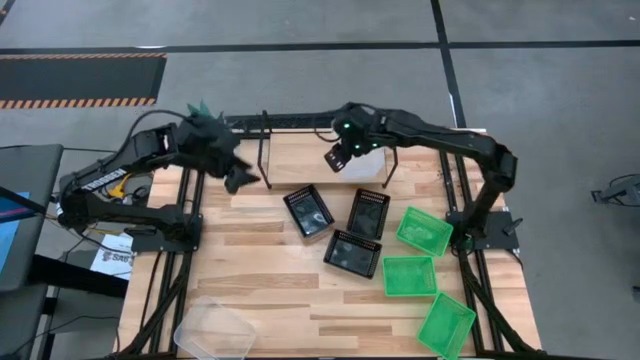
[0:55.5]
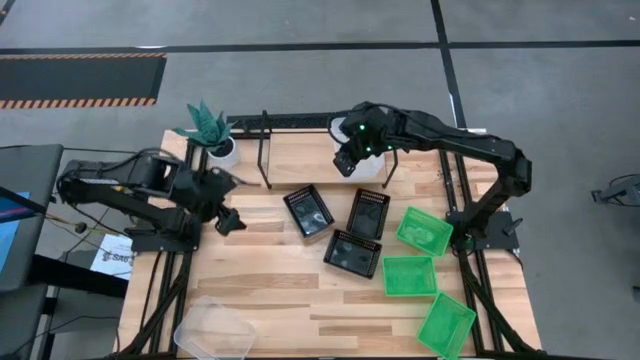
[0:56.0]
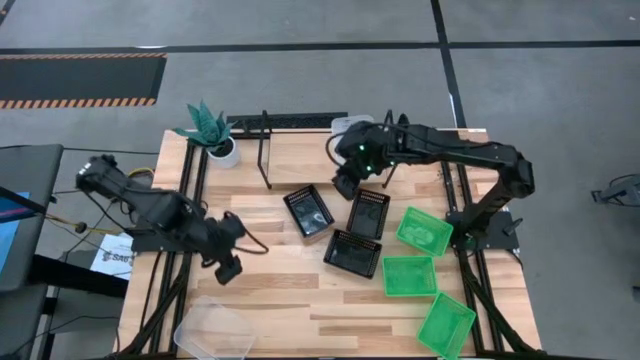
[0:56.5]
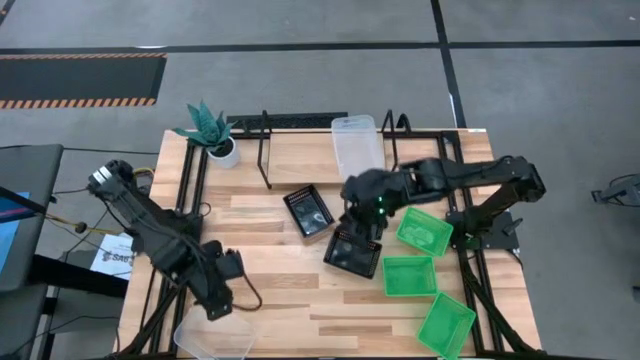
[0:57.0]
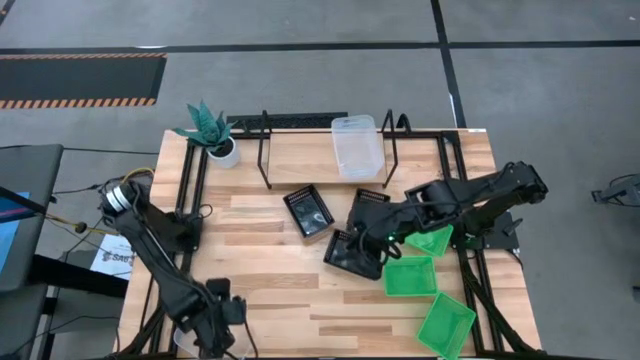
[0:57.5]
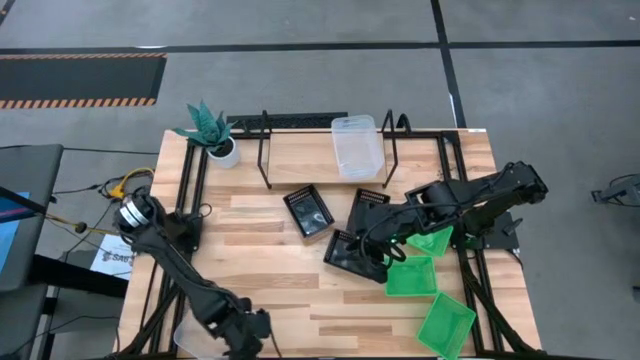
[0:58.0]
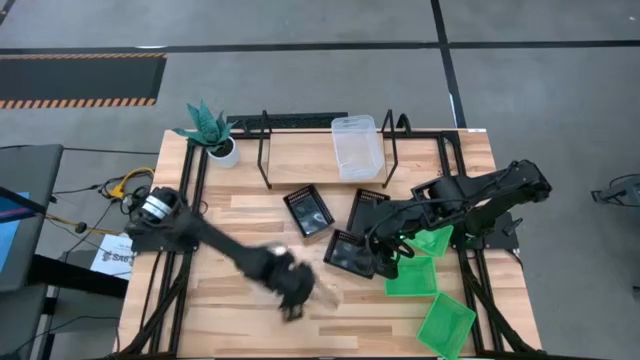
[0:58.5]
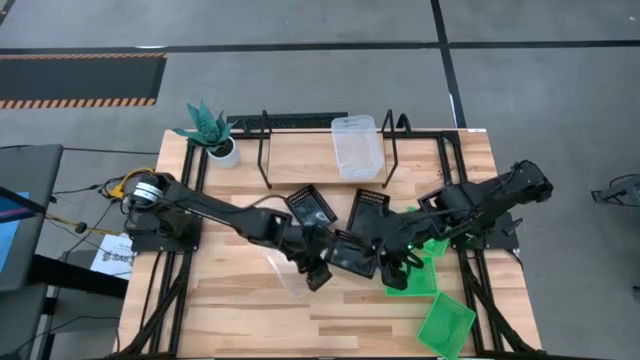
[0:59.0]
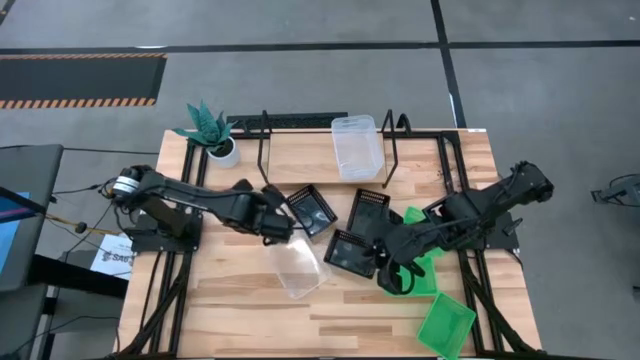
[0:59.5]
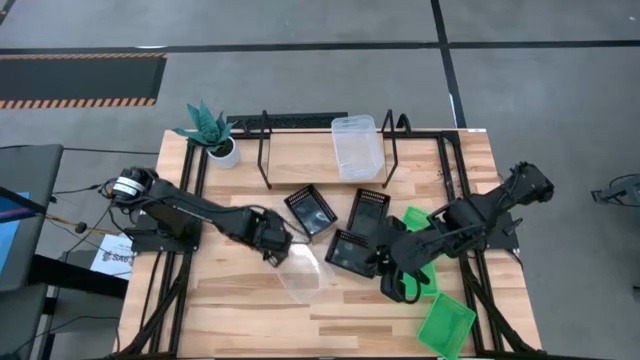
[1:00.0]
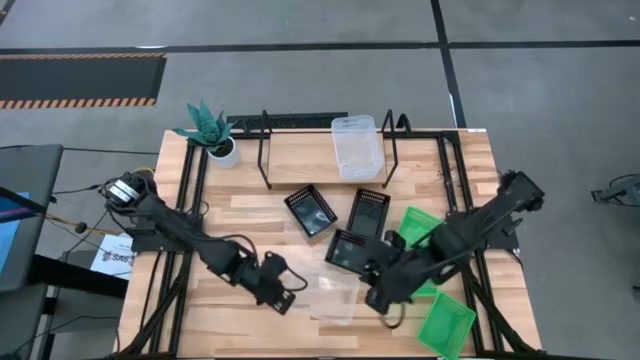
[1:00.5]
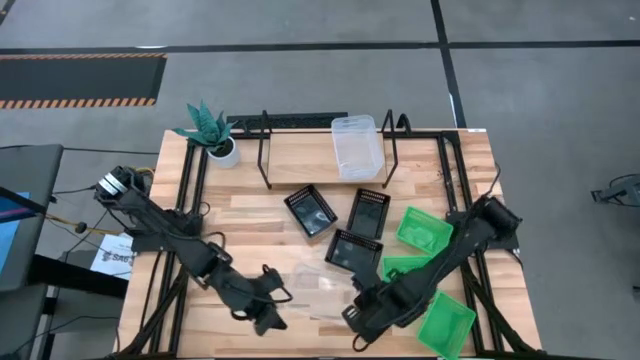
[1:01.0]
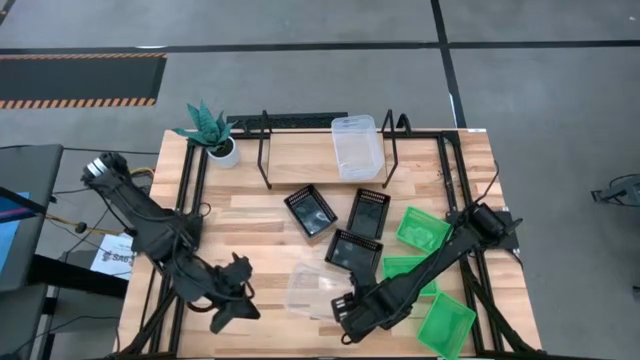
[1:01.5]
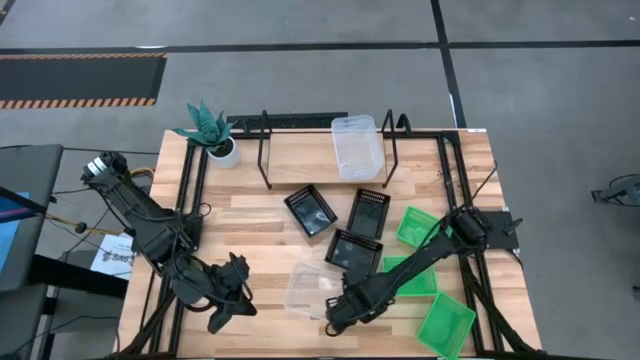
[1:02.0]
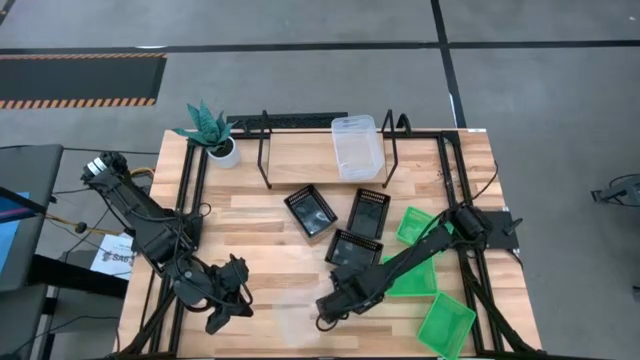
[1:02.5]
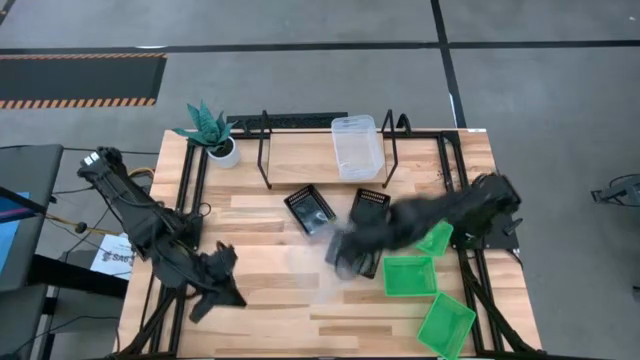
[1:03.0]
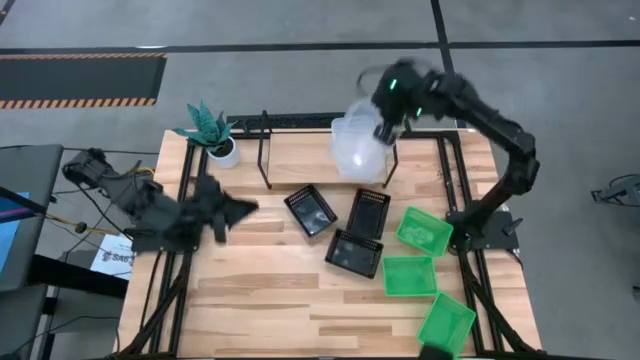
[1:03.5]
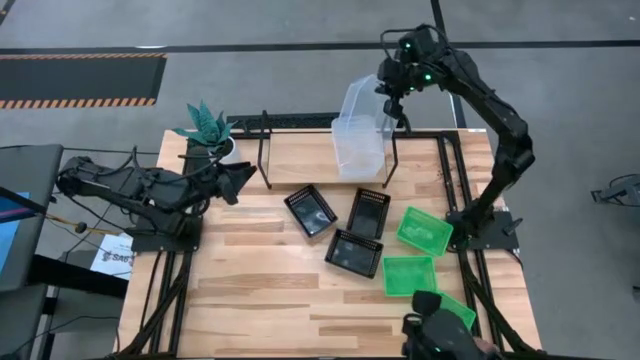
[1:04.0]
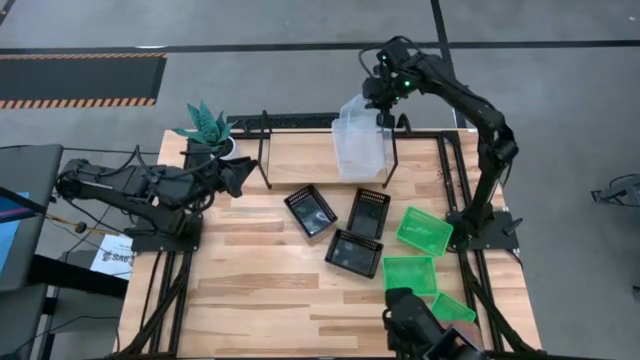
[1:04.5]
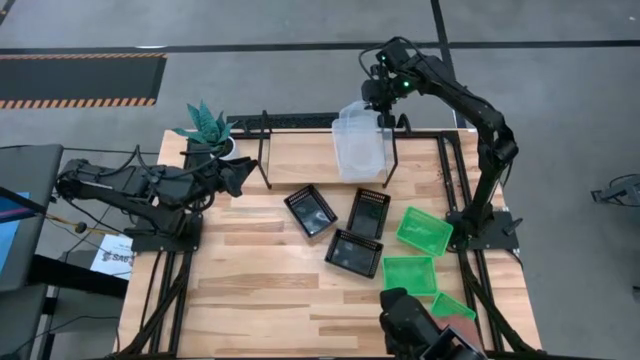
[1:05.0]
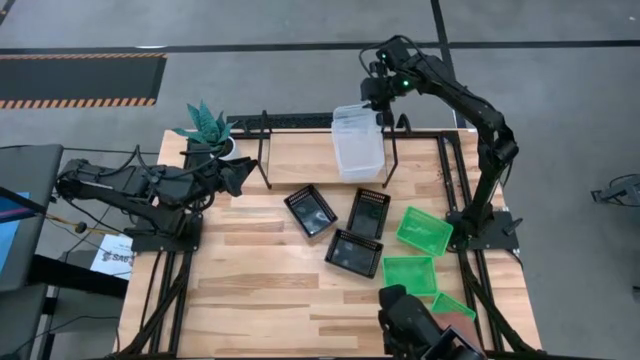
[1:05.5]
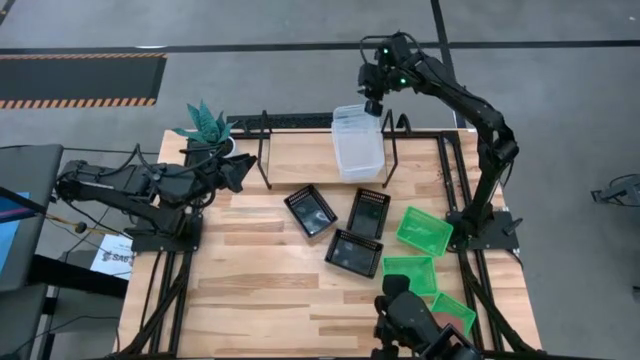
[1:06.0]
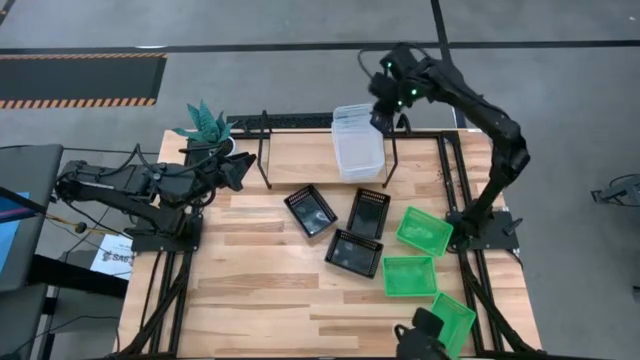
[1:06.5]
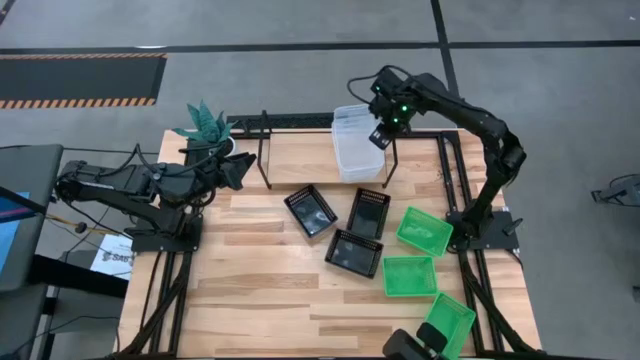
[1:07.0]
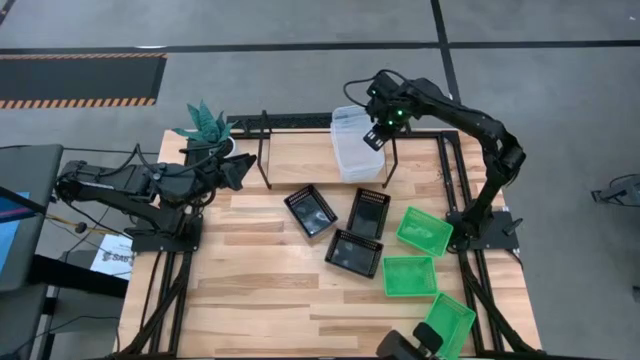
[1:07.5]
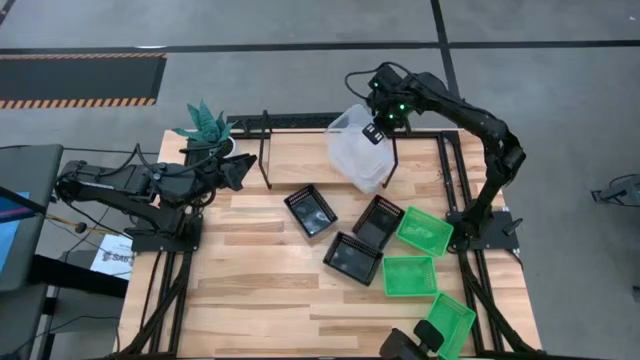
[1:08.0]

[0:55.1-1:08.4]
Task: Stack baskets on shelf by color
Stack the transparent bin on top of the stacked transparent bins on the shelf

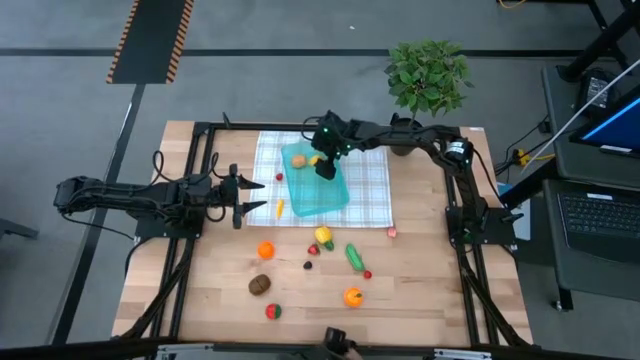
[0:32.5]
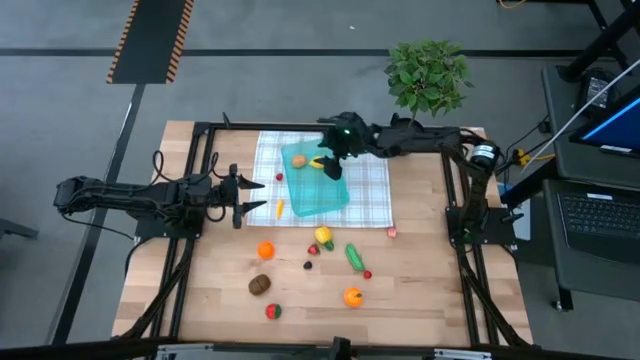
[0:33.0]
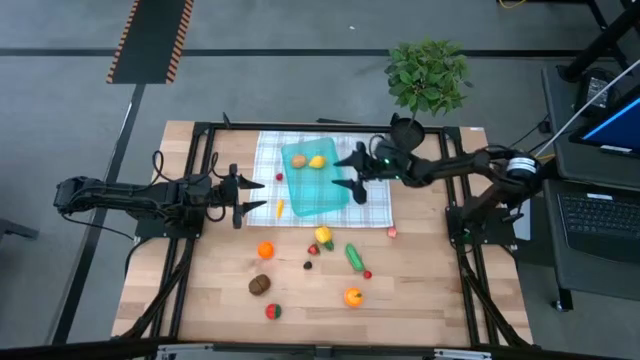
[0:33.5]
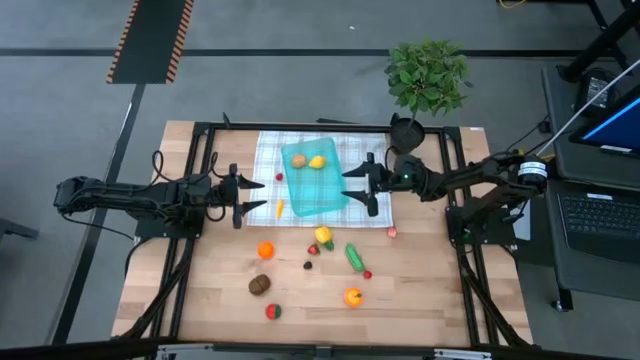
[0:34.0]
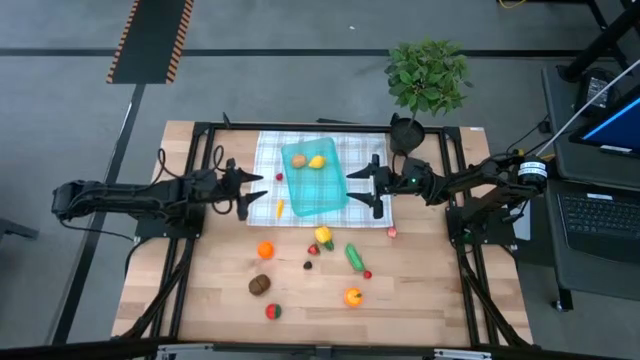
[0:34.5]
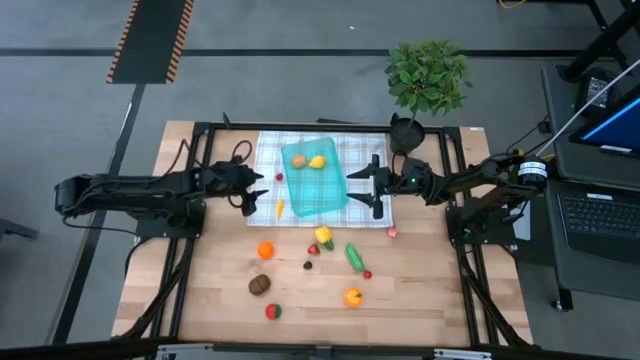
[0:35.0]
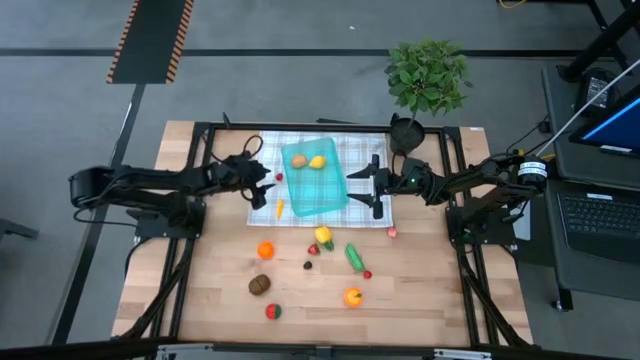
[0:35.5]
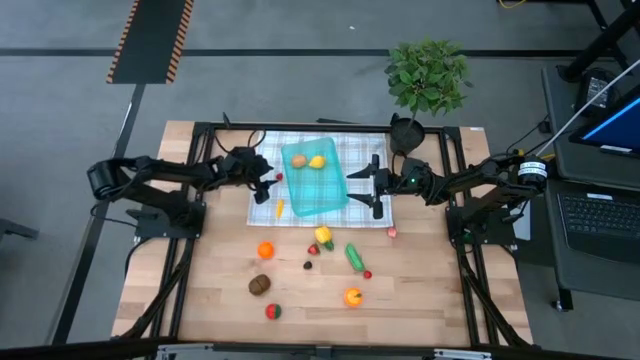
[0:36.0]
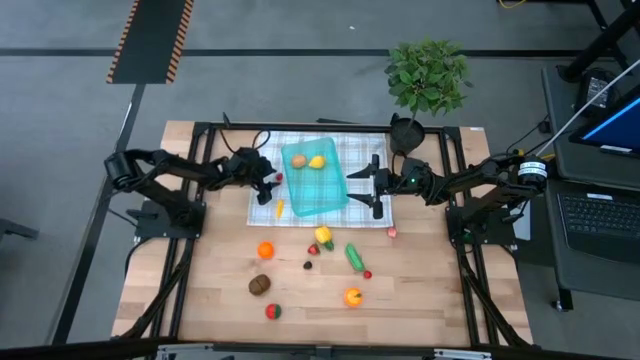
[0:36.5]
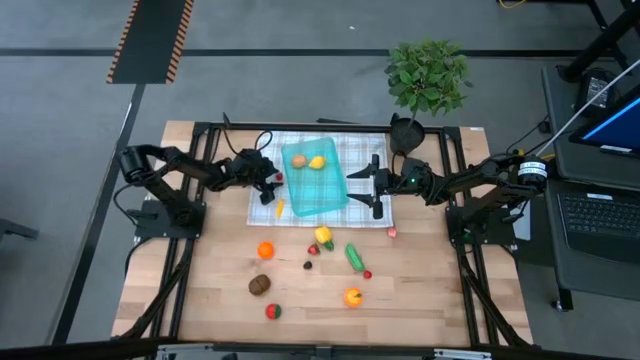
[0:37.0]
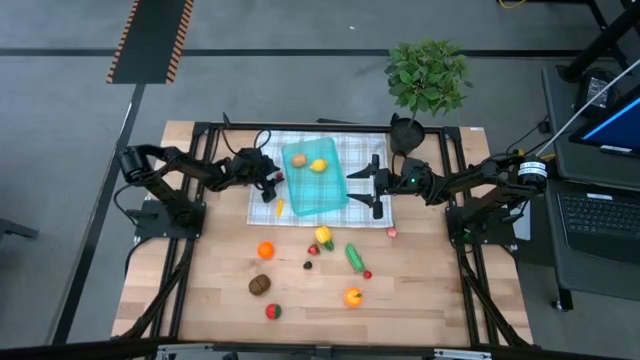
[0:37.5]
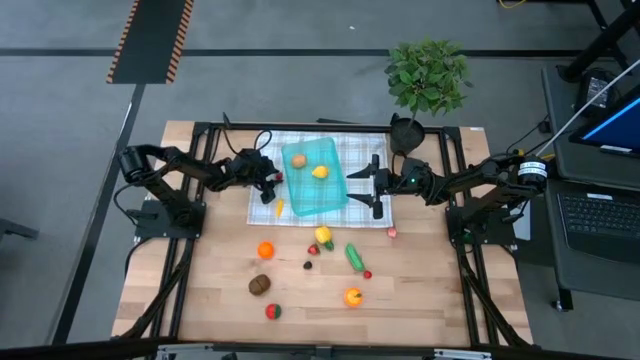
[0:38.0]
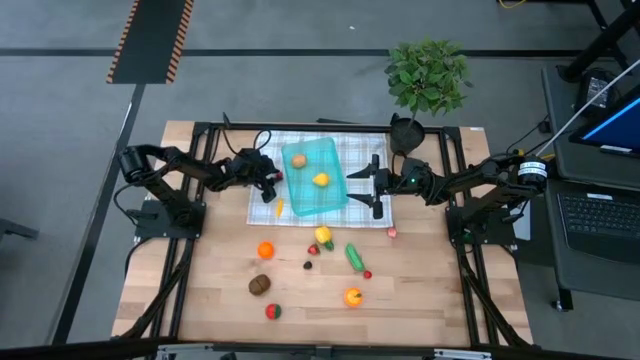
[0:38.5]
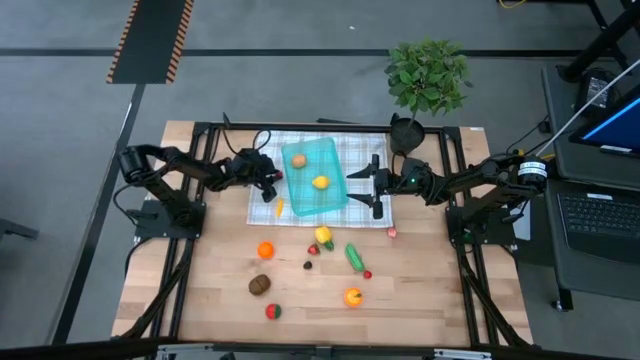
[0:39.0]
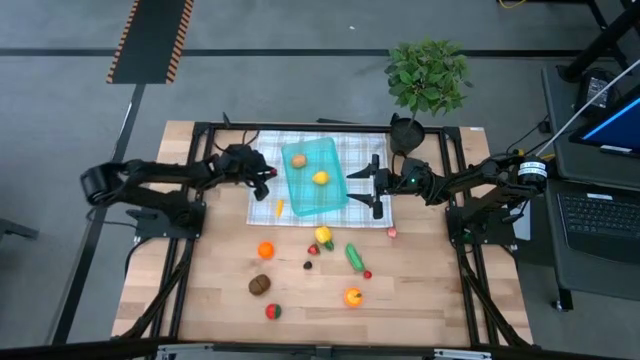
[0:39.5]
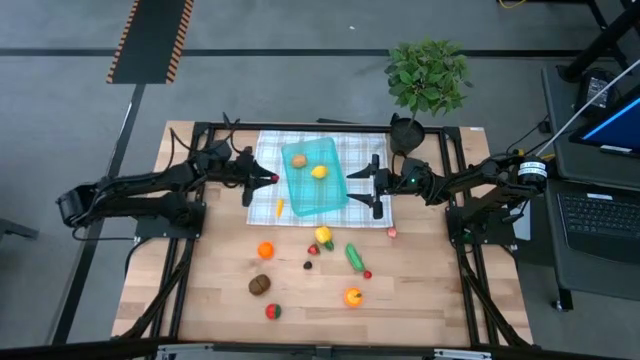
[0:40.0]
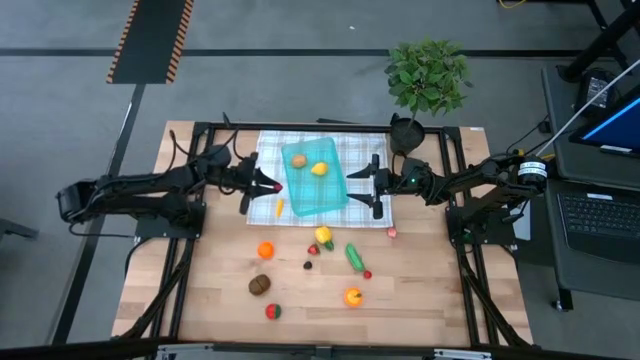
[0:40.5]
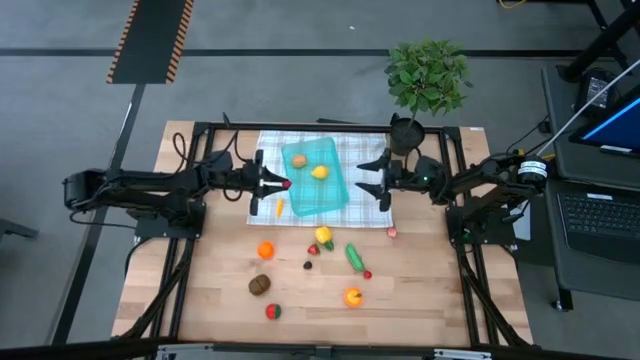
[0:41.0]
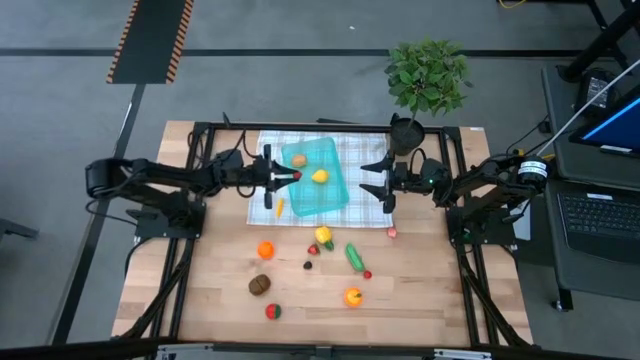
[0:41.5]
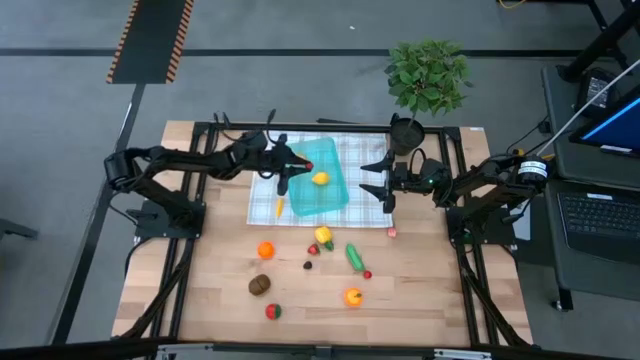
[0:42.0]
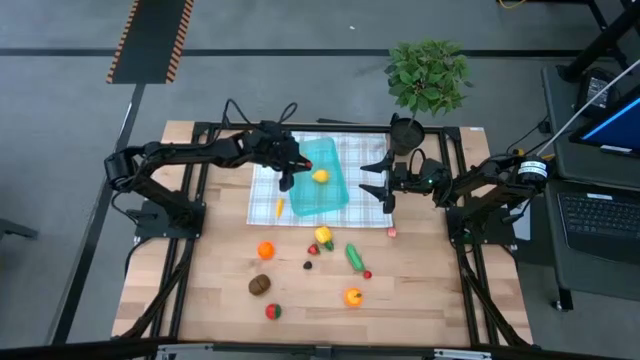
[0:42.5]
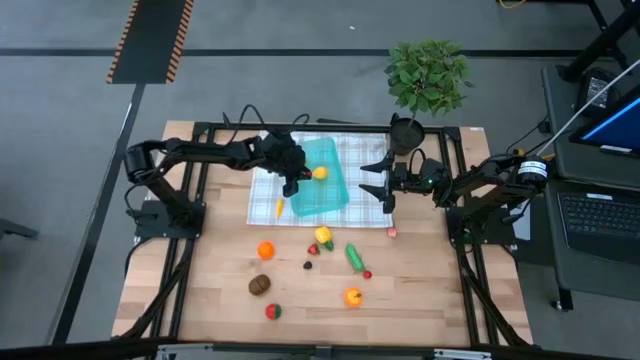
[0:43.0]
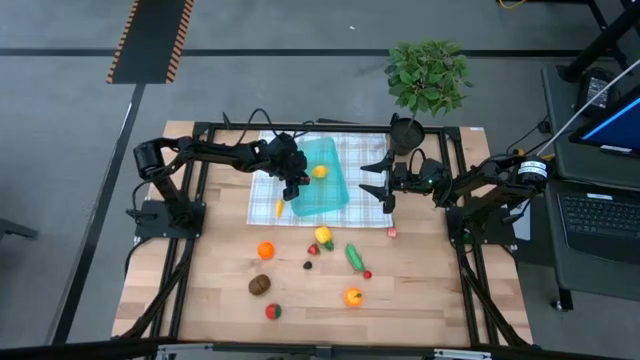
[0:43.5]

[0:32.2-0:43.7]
Task: Pick and placing Produce into tupperware
Put the top red raspberry into the blue bin
